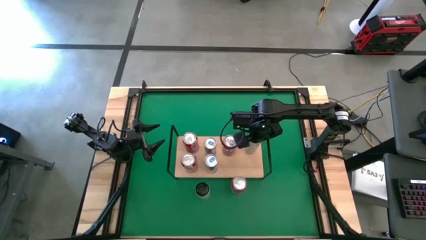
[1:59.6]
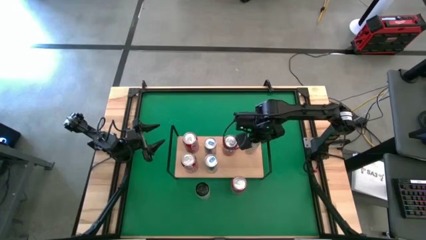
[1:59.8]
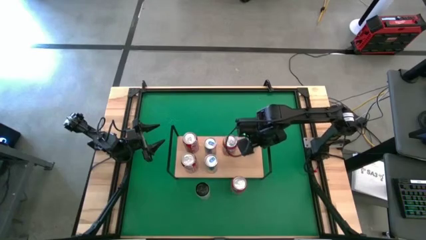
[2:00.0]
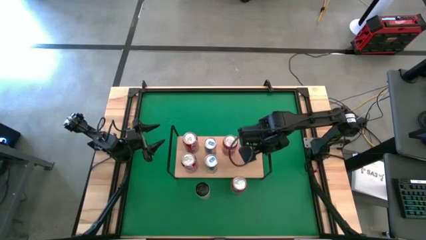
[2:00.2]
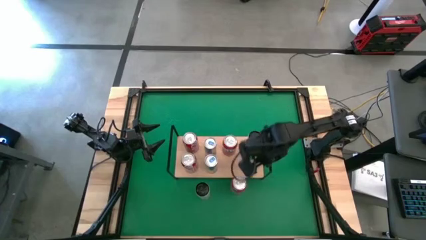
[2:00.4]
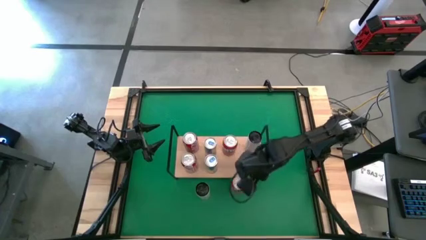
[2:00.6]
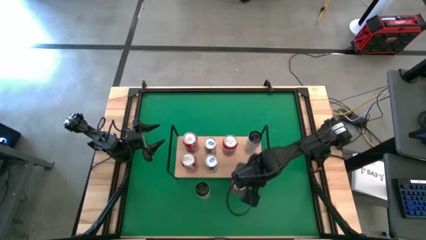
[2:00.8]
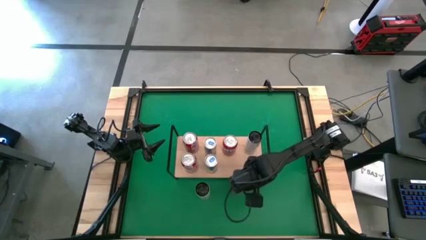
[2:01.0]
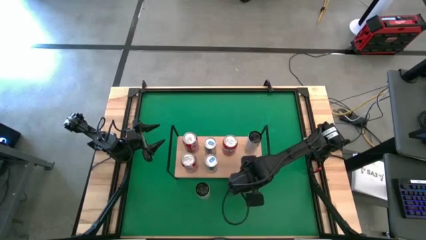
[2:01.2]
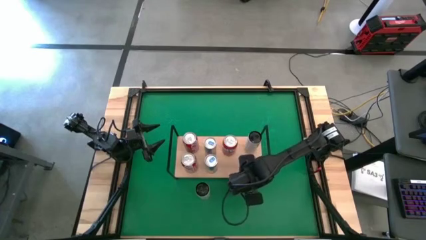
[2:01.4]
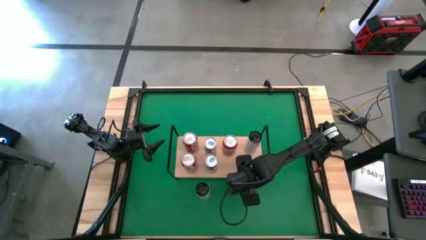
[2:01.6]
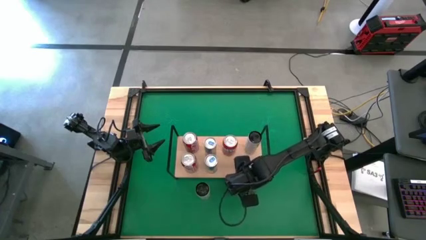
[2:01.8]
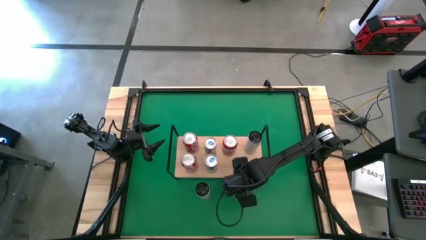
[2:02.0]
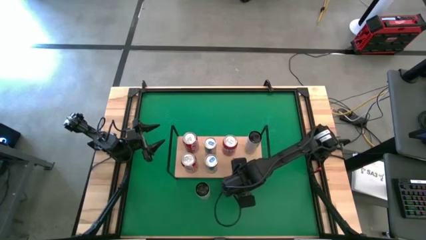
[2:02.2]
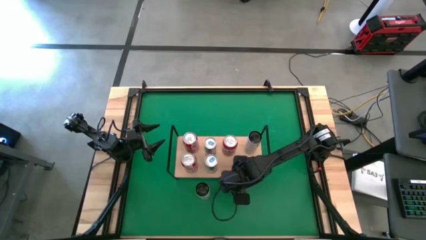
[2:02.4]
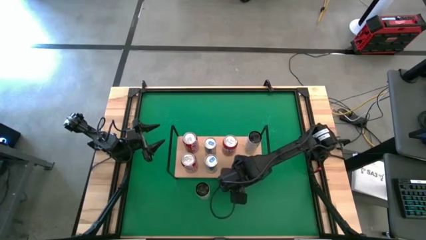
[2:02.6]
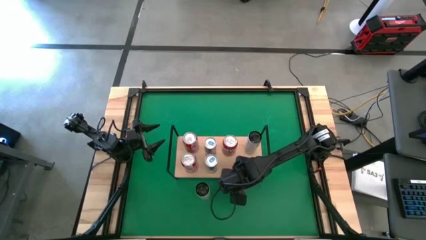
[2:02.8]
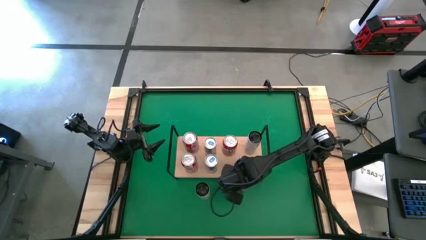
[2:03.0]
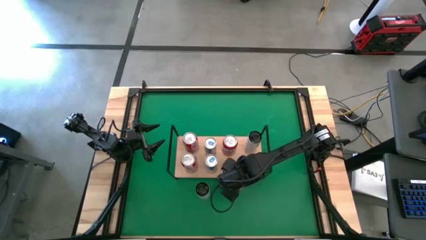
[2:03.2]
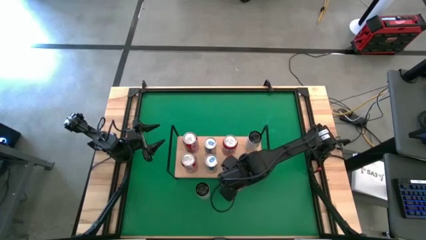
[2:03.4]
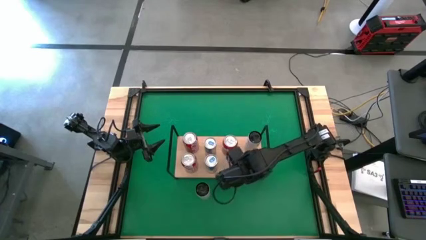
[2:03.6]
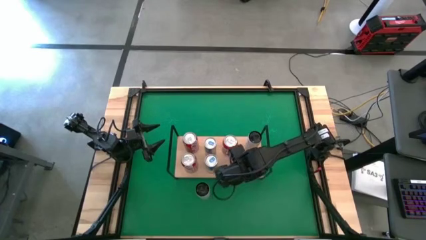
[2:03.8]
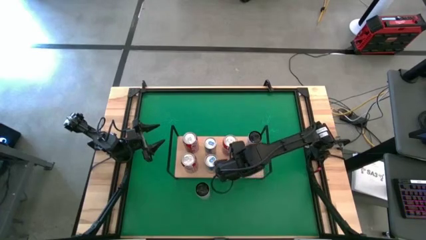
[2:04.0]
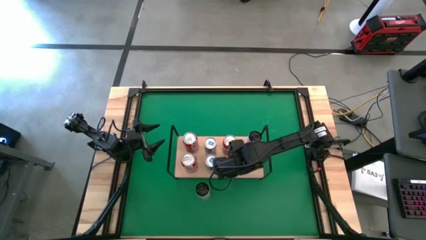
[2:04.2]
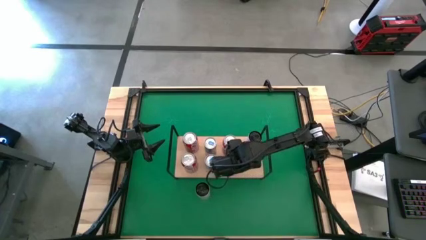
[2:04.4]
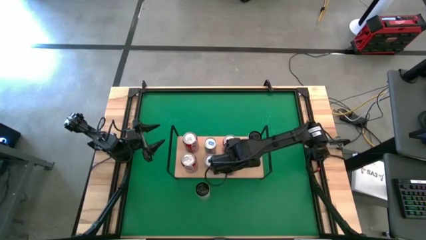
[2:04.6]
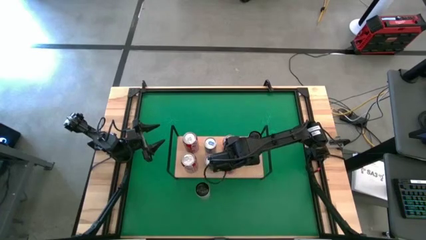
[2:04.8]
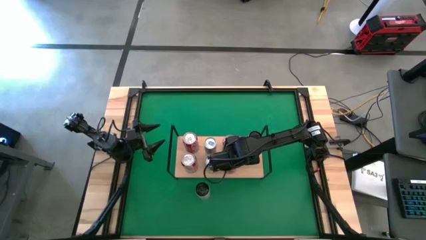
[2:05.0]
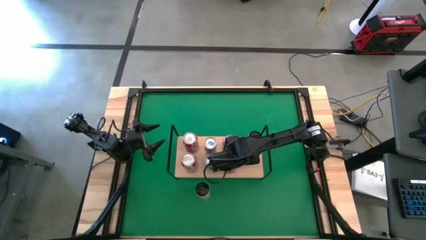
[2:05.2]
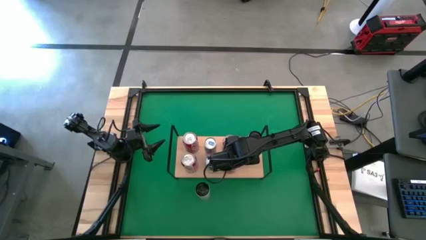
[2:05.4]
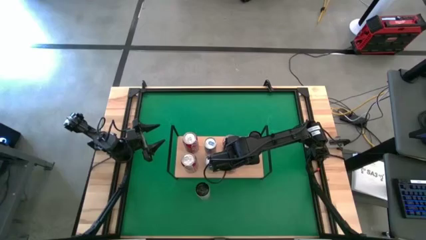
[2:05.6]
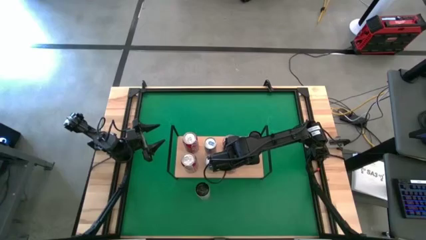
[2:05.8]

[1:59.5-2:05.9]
Task: Place canned beverage on shelf
Put the orange soda can on the shelf

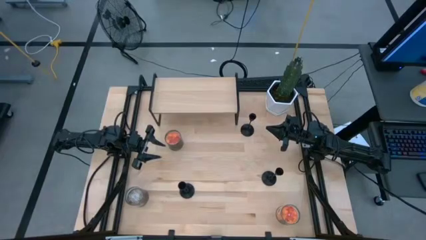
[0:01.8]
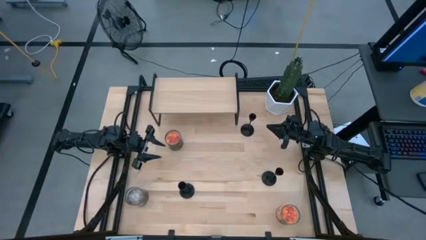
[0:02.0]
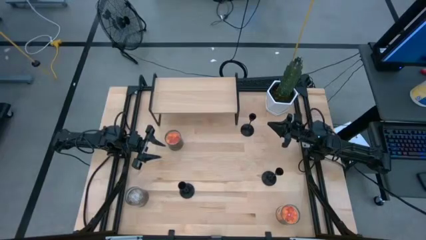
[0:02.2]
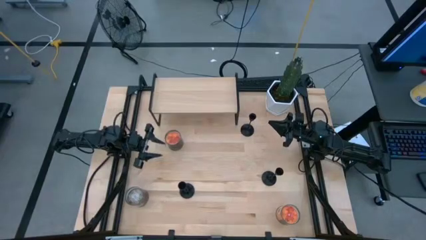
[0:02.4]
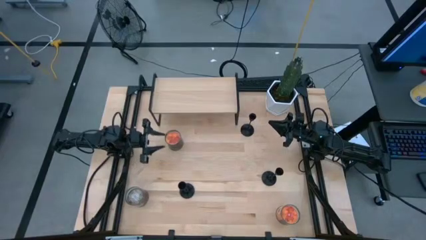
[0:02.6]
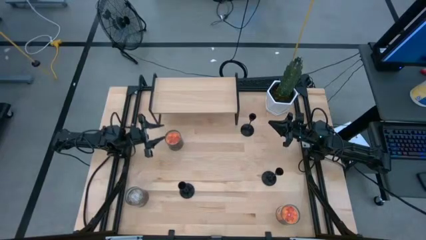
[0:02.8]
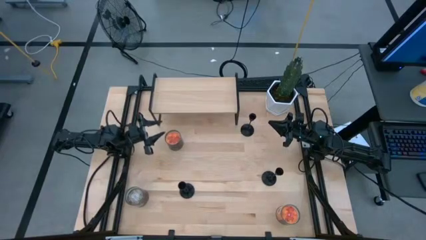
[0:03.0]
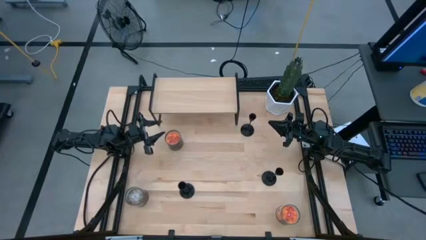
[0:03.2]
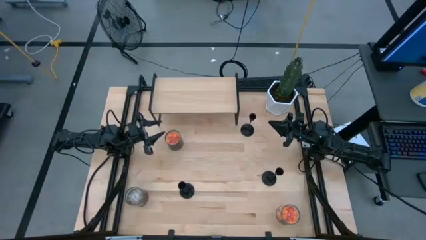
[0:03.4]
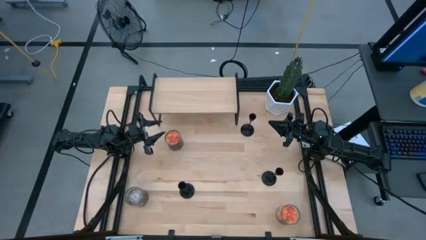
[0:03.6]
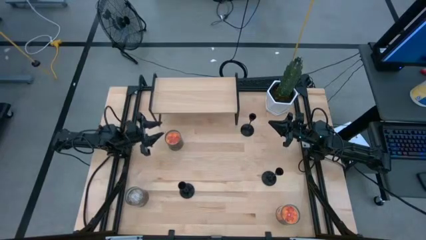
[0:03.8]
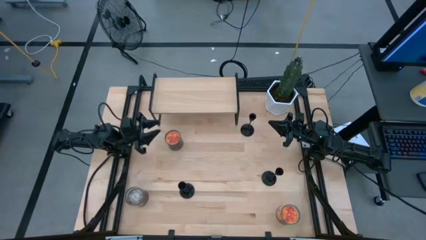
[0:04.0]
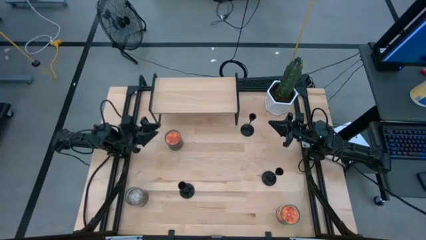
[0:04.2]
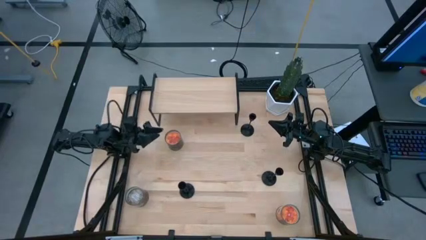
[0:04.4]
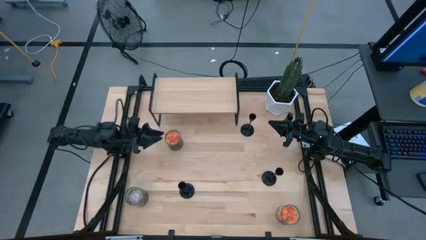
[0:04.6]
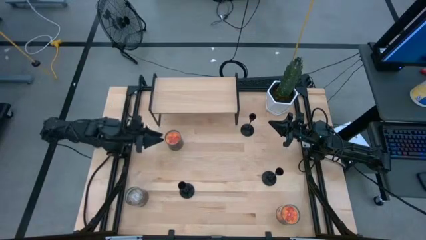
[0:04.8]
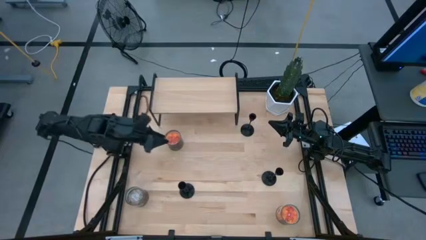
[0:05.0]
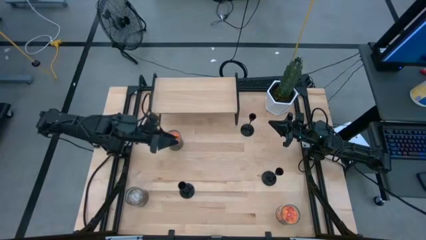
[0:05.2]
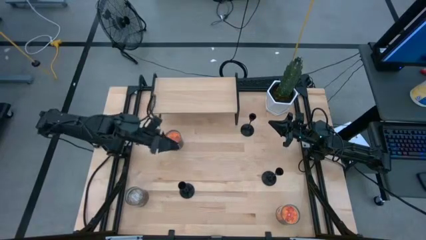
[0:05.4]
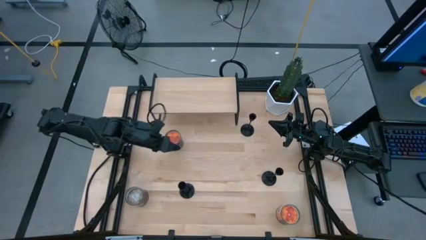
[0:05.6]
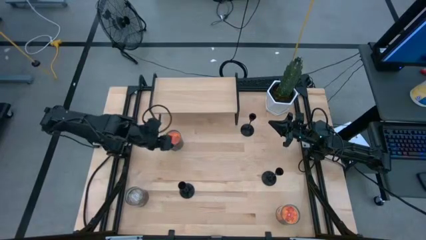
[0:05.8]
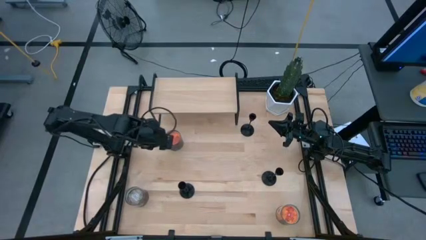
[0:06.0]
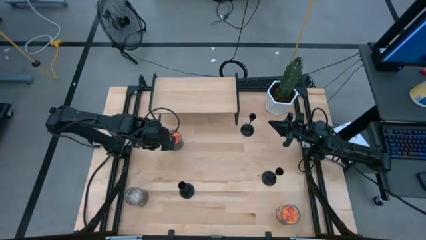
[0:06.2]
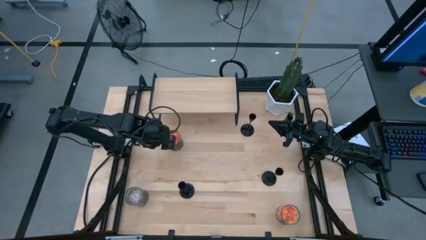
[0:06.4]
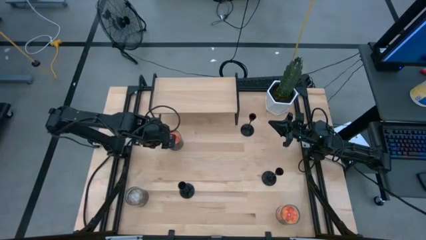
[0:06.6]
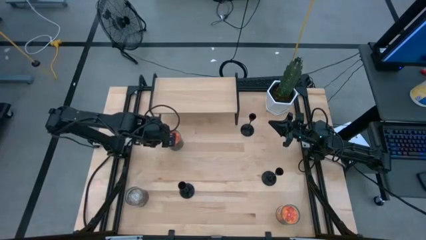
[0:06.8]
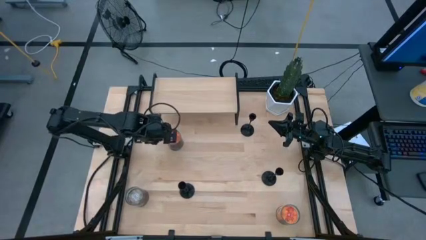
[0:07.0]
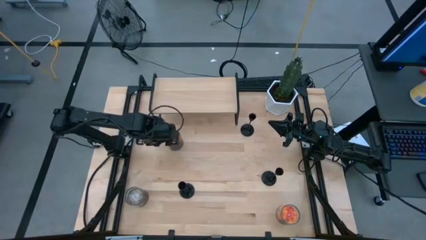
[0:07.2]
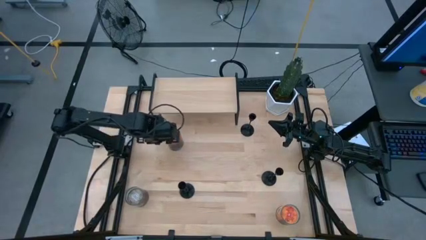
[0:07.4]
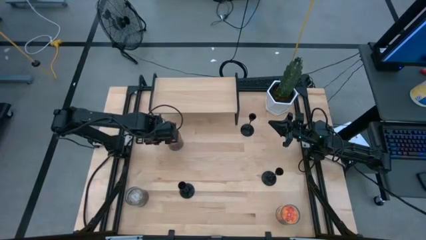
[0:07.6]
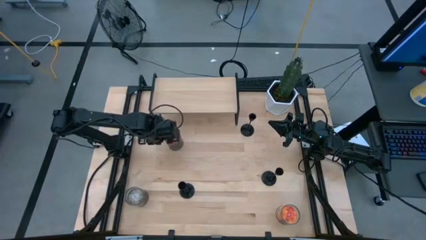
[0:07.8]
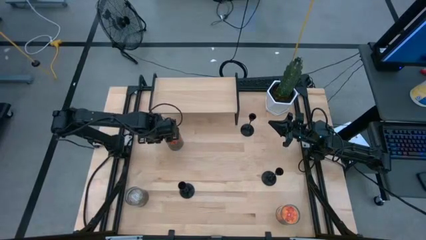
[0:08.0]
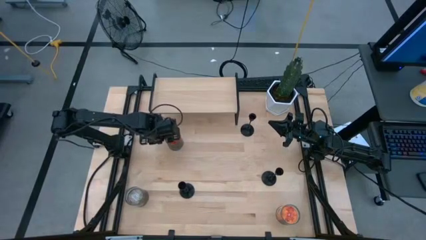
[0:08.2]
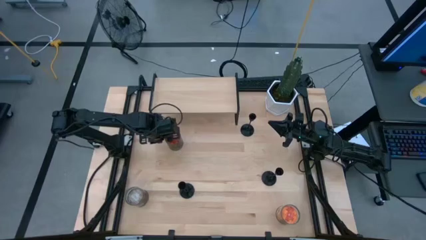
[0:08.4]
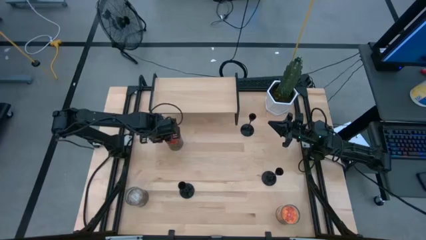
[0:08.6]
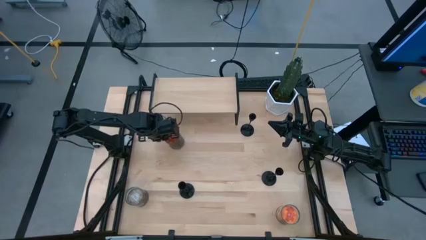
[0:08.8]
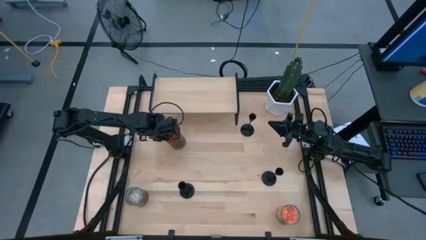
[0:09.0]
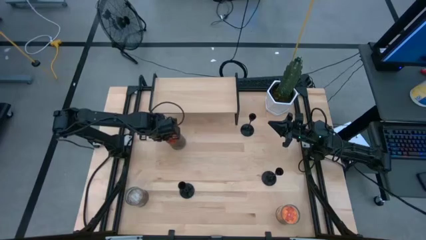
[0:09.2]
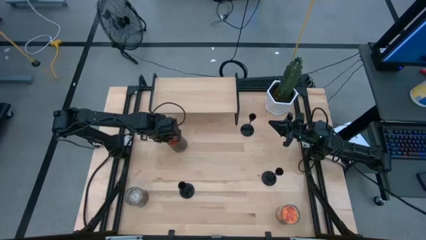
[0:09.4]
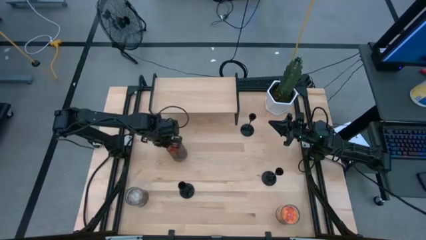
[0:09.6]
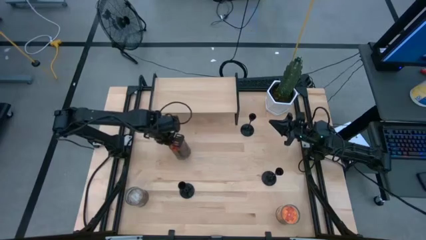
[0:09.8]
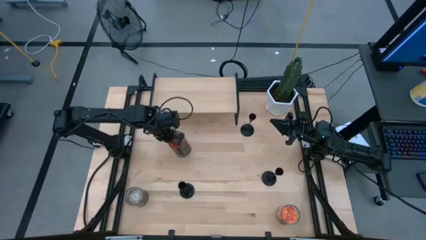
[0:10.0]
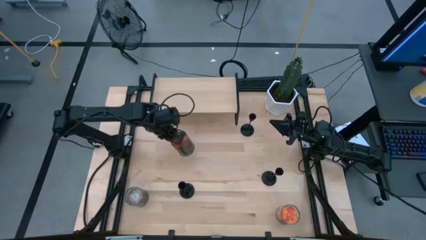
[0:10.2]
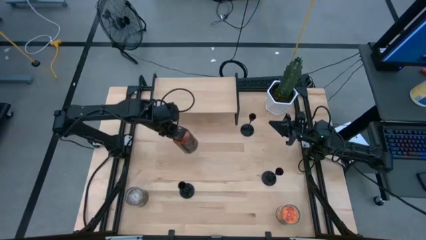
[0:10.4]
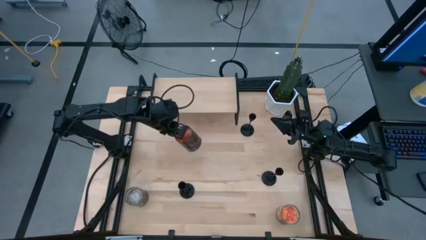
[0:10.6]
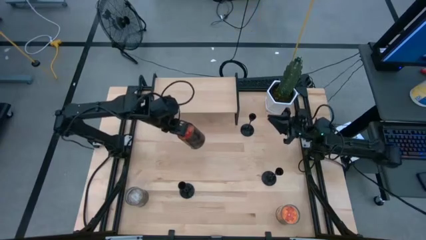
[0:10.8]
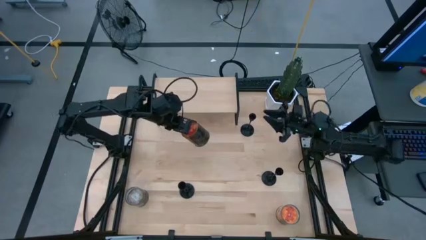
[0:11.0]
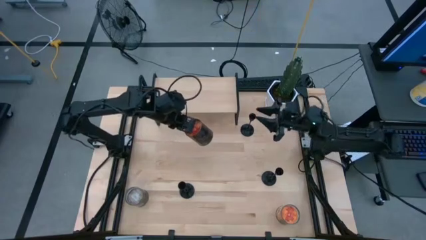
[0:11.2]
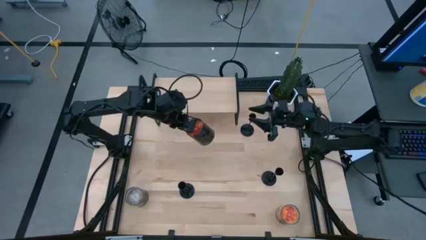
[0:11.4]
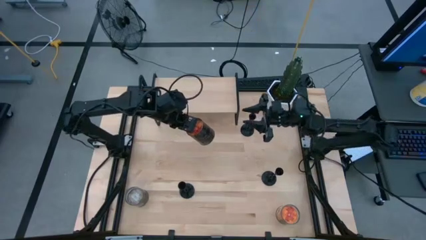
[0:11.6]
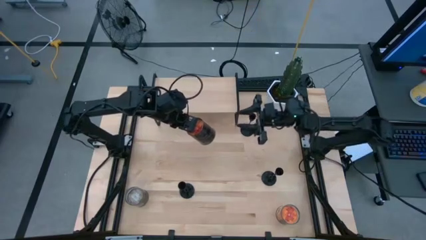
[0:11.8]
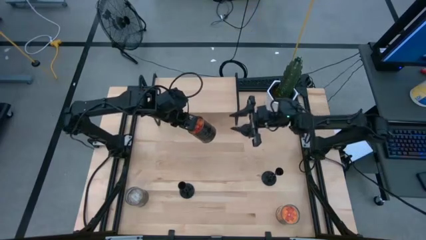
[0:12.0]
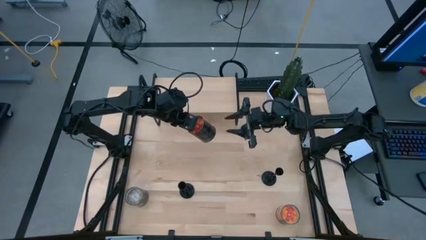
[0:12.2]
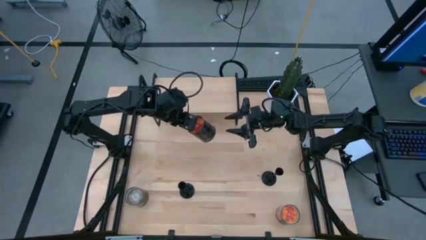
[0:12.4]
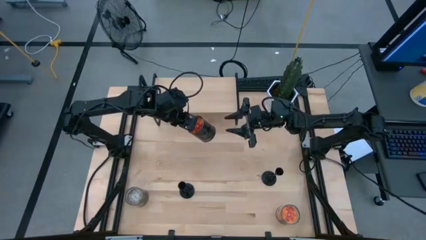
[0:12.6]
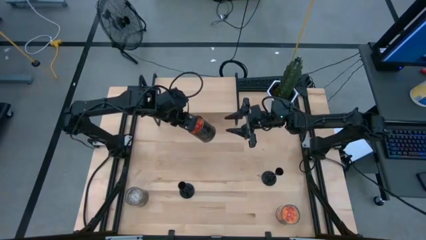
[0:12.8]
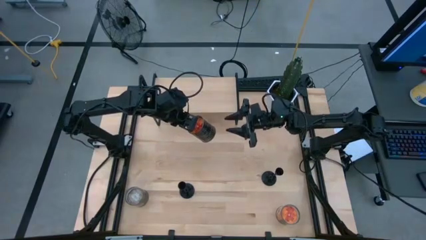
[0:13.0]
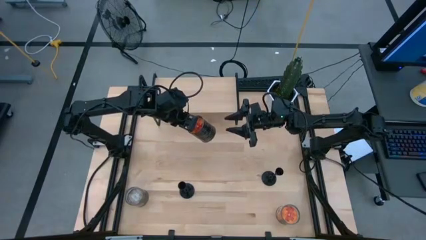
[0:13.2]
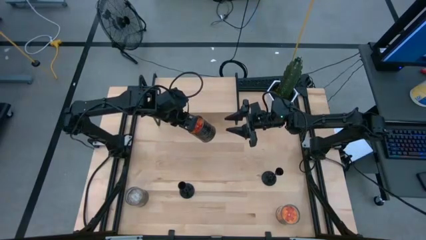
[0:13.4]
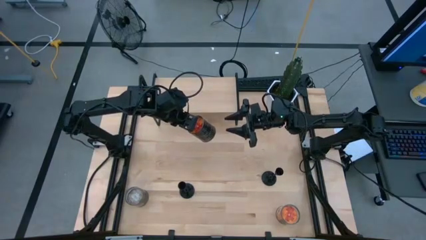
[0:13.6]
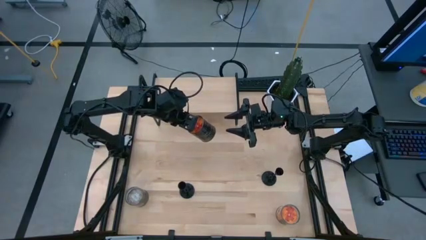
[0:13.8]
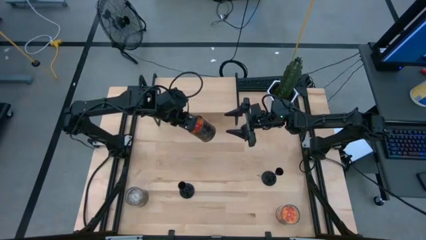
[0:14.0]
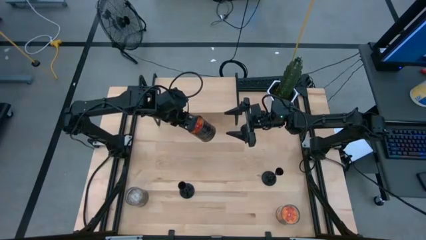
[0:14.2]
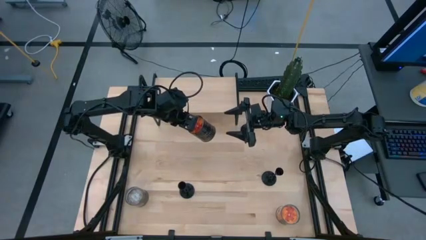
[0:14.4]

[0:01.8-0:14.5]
Task: Pick & Place candle stick holders
Put the top silver scented candle on the shelf
